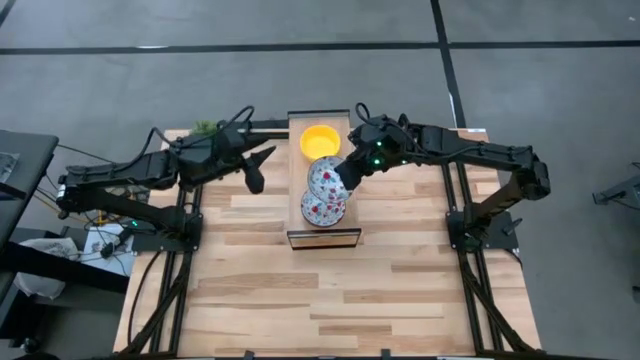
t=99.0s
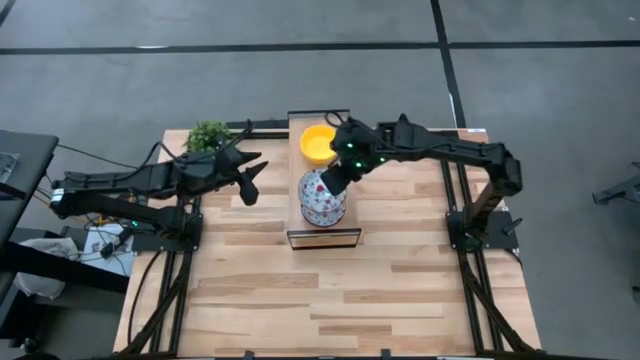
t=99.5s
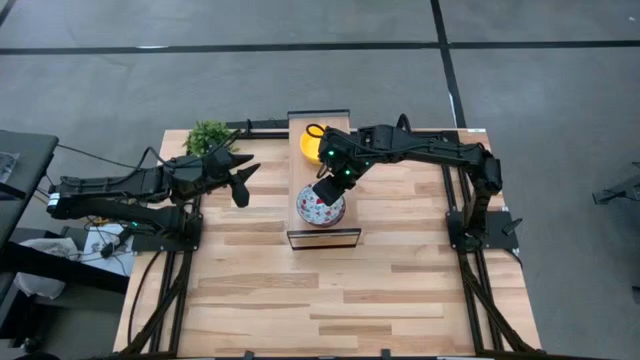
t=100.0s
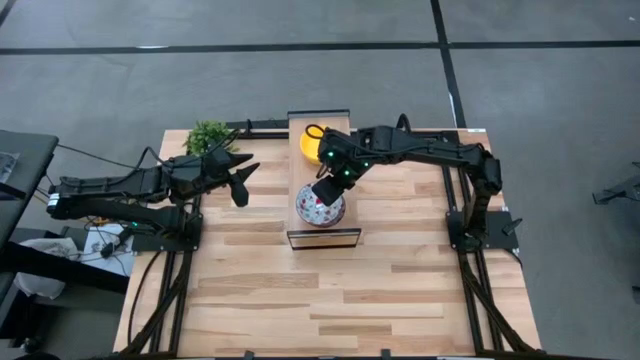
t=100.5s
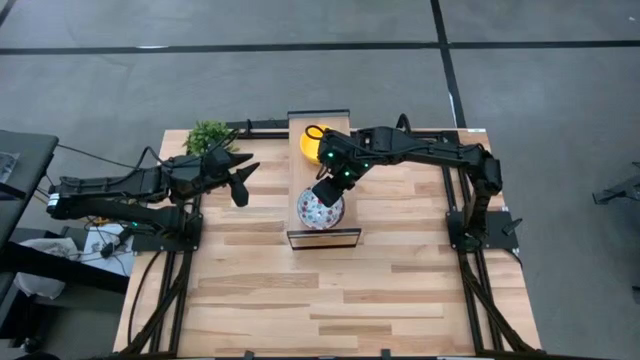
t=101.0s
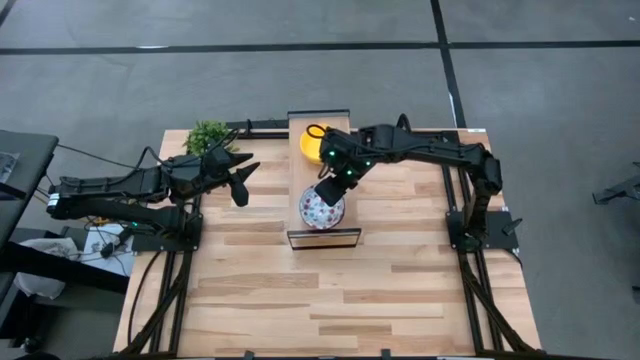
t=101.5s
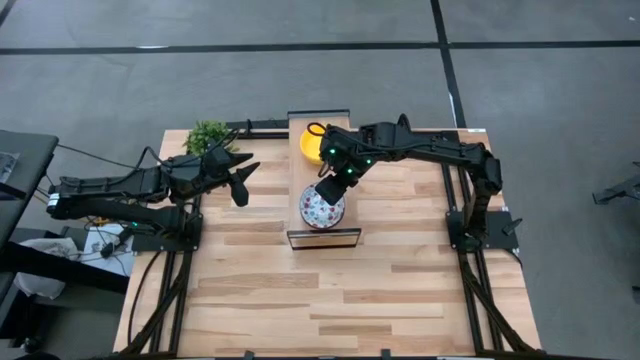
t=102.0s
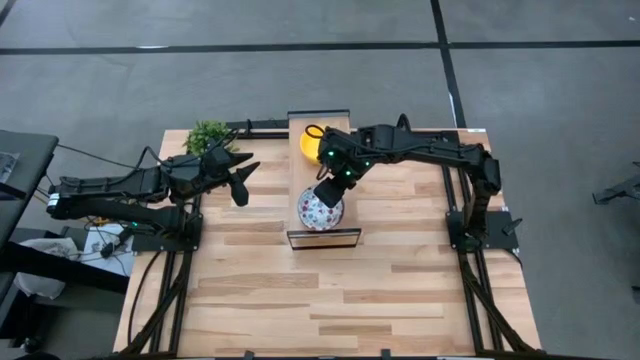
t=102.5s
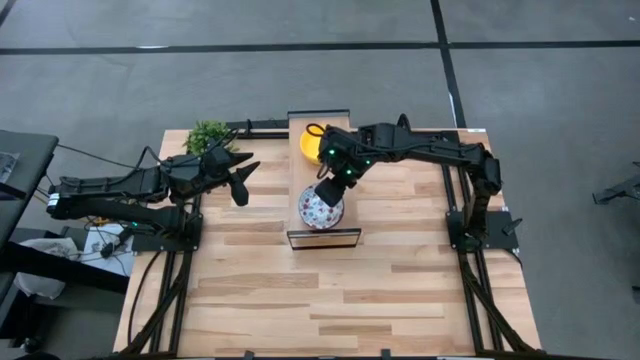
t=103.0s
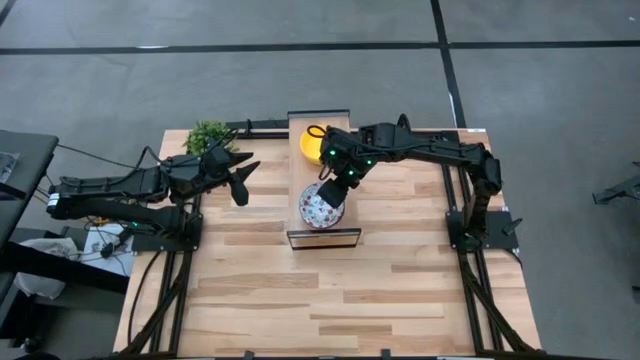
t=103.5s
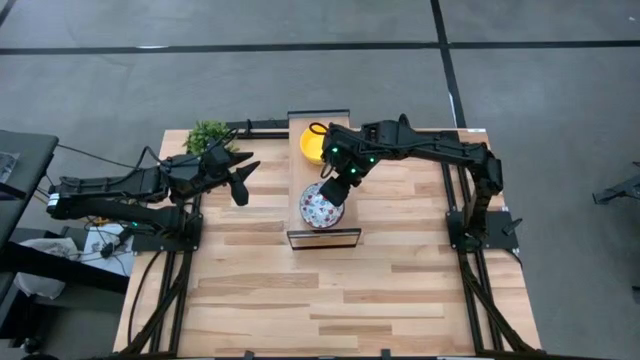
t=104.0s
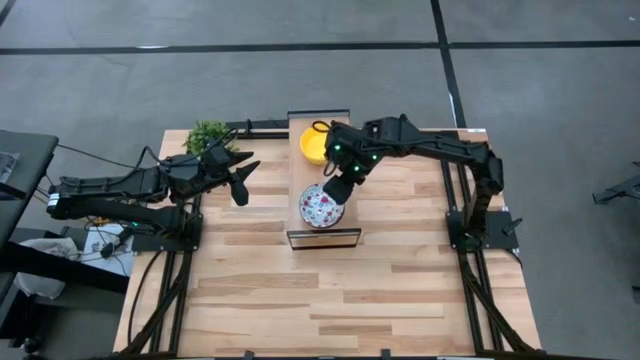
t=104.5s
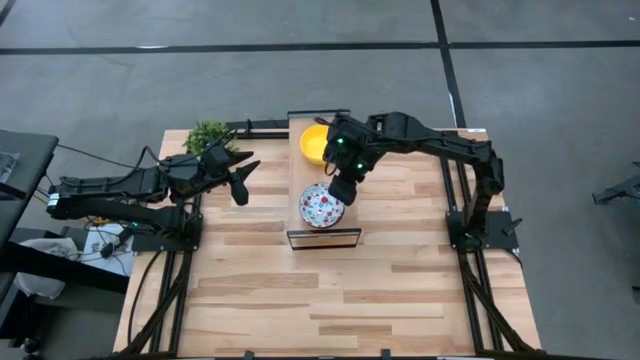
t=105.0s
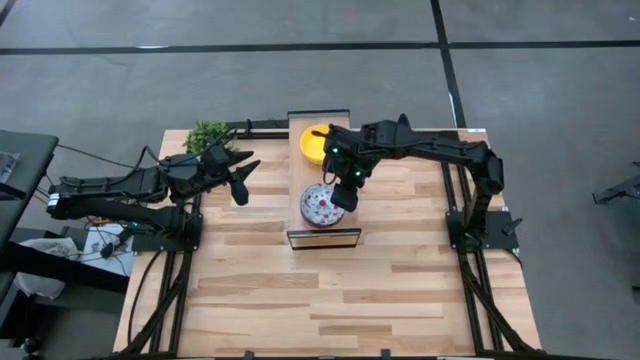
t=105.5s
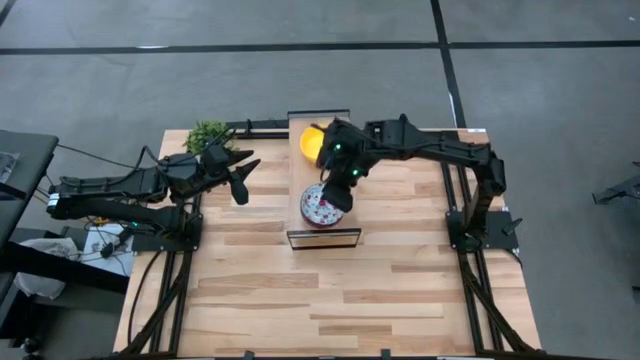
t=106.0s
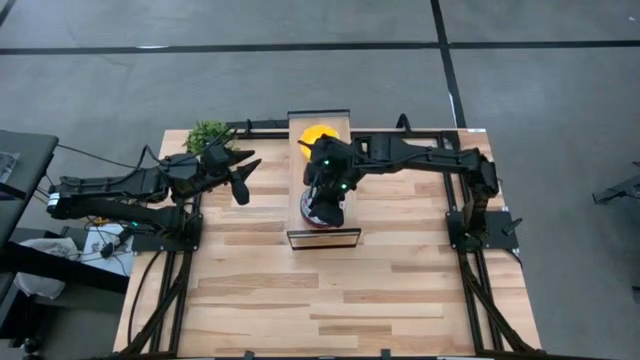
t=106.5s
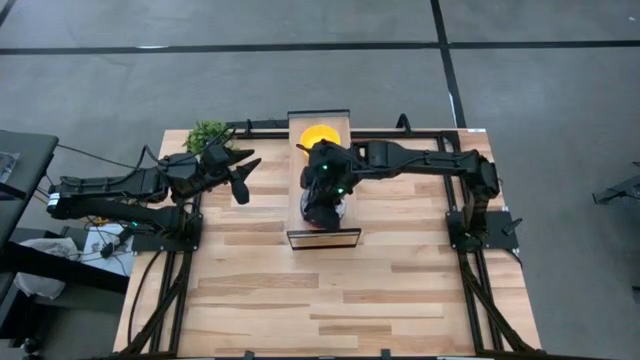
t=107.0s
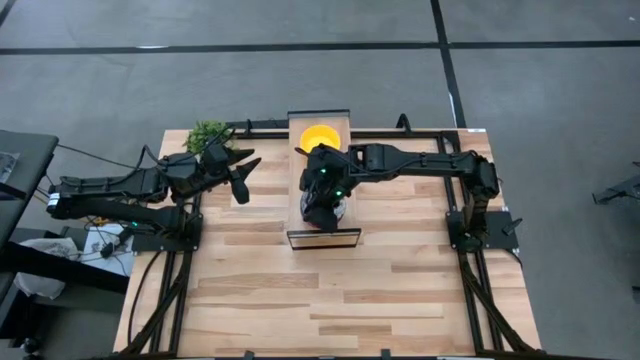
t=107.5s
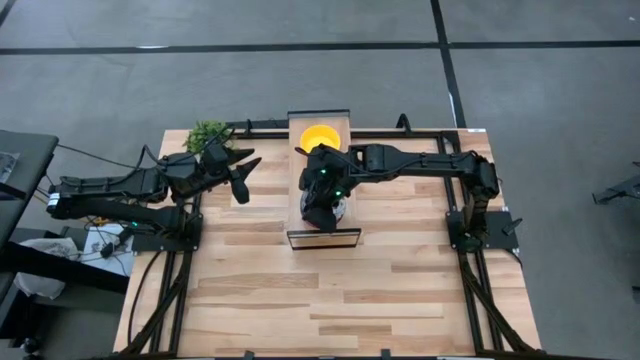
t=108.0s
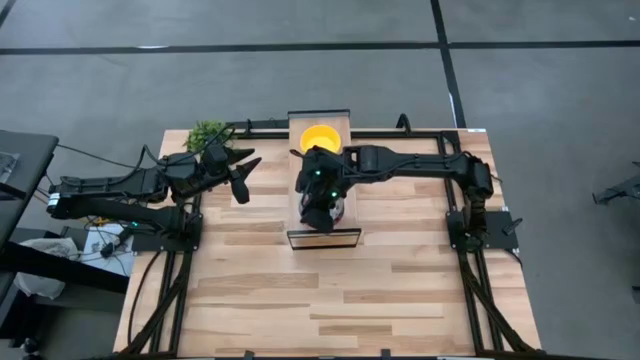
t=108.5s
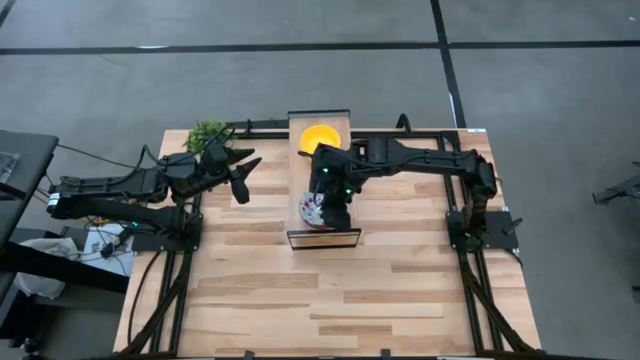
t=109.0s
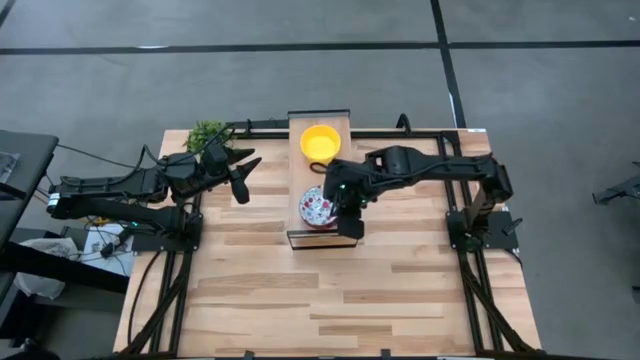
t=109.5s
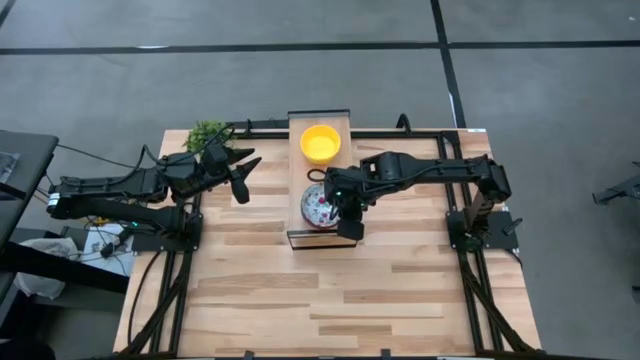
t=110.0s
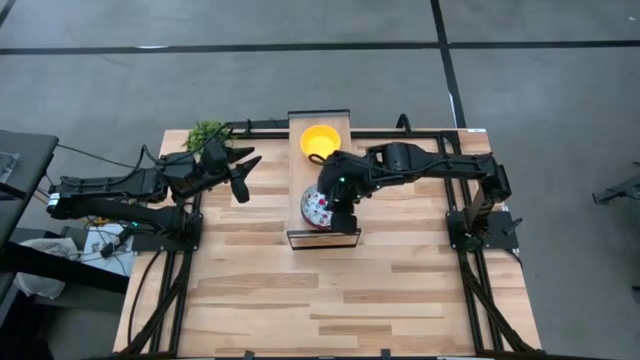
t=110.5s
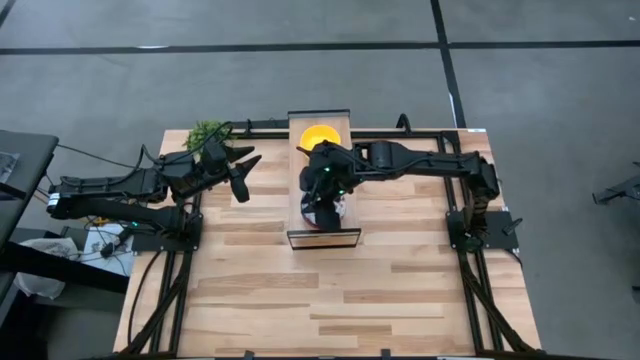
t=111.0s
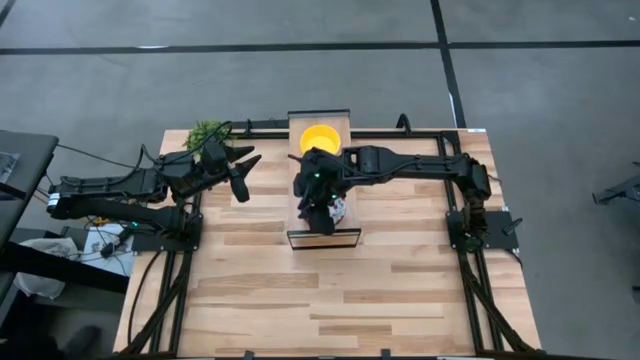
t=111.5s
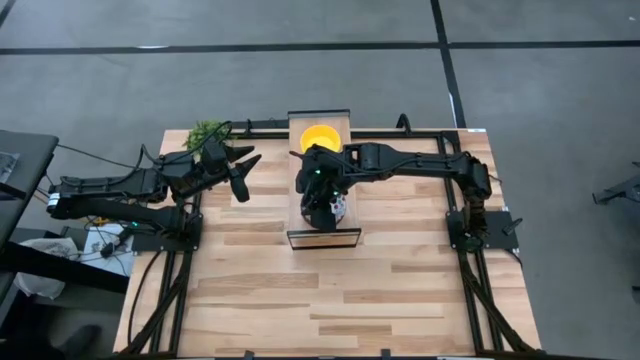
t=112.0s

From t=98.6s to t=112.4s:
Task: Pick & Place Mini bowls
Stack the red patterned bowl on top of the red patterned bowls on the shelf

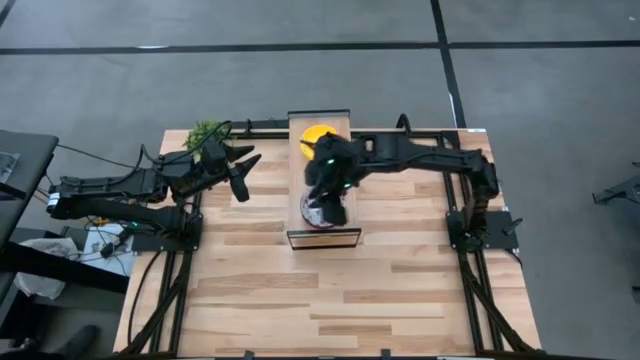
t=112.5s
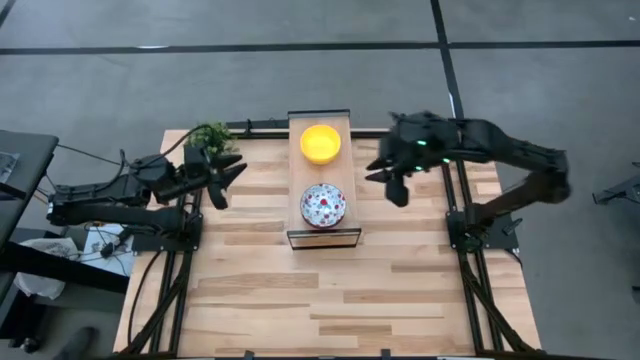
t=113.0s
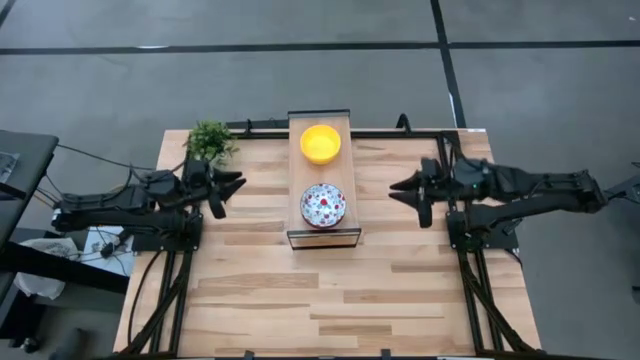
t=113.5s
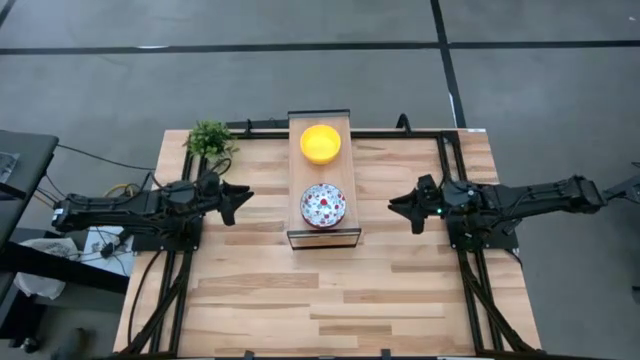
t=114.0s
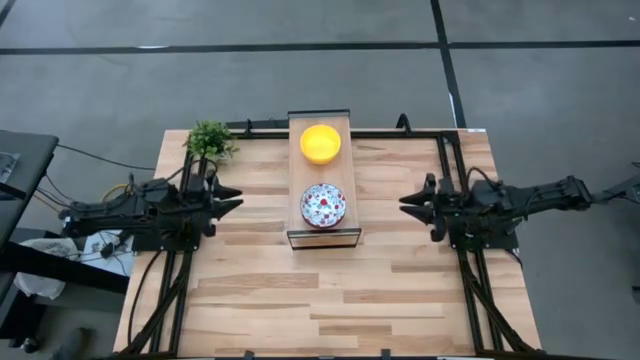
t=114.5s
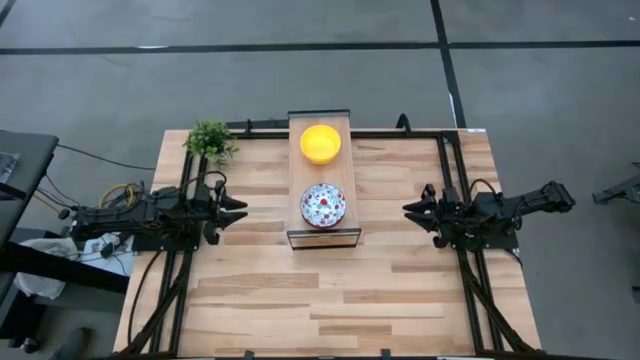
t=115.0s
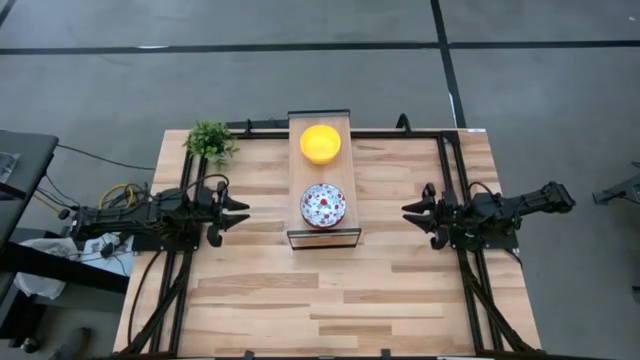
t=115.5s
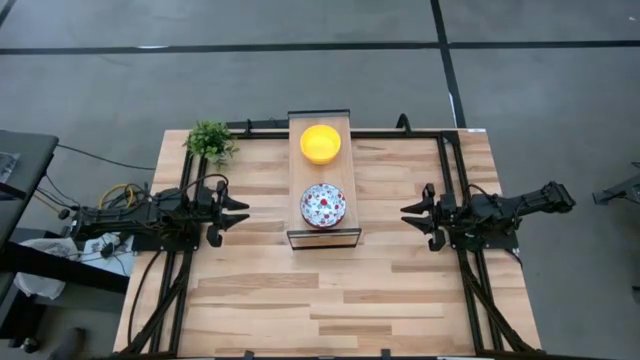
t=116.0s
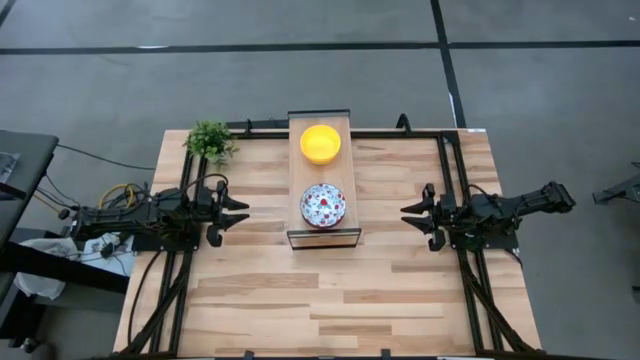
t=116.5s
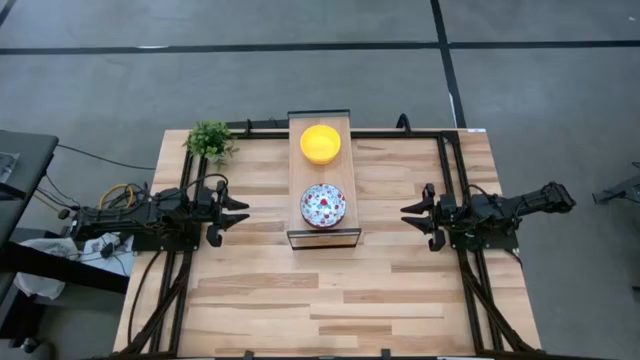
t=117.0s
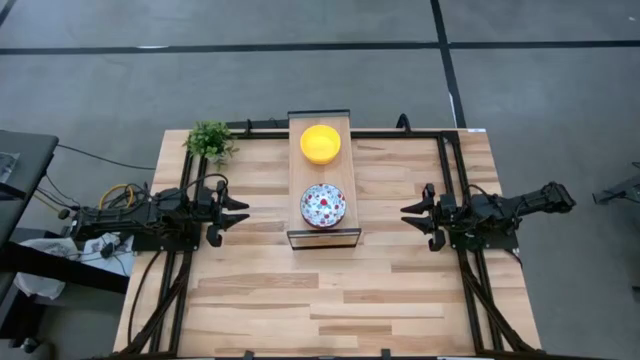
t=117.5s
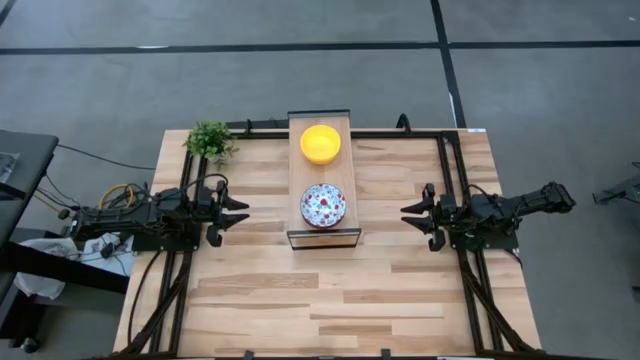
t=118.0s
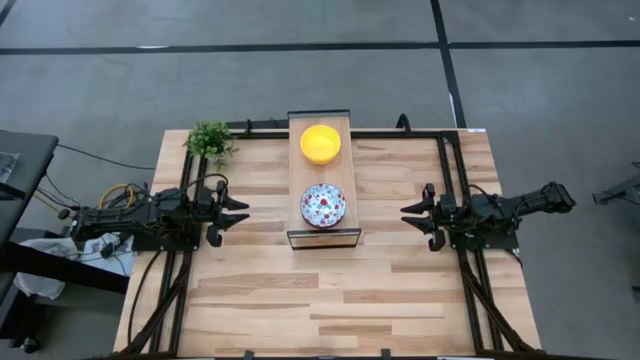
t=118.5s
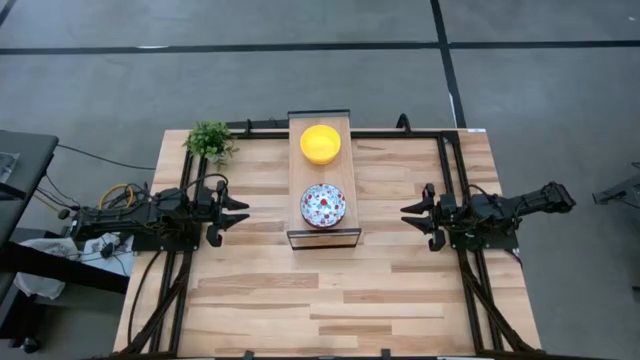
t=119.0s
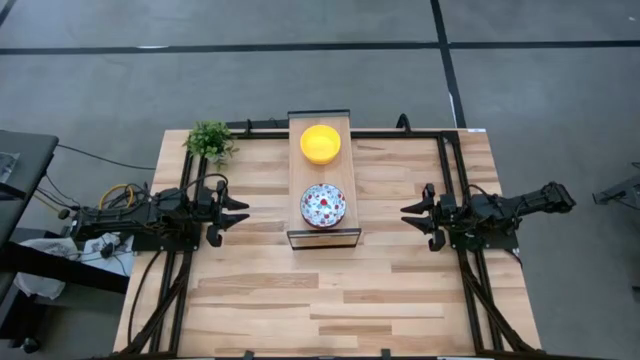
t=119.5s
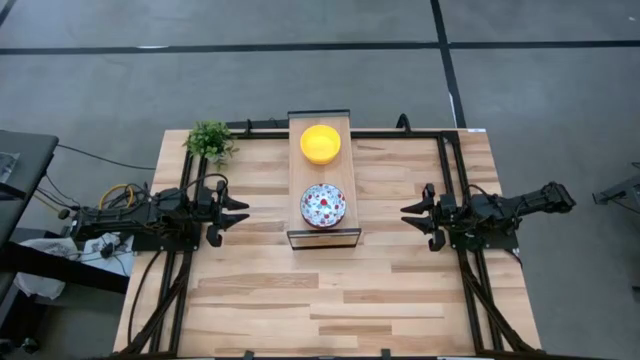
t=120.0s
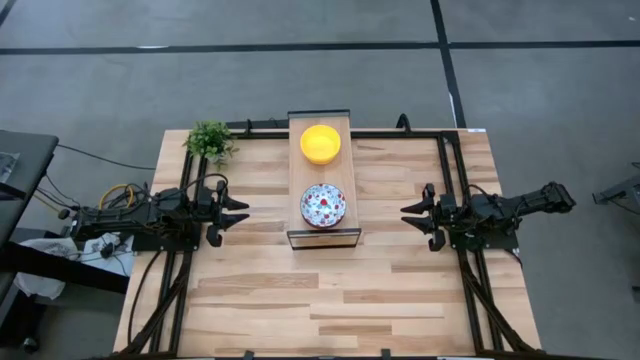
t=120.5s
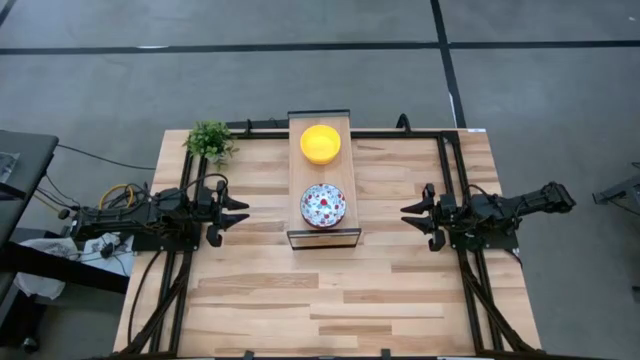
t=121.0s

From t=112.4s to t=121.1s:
Return to Home Position
